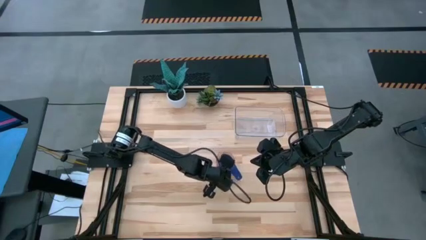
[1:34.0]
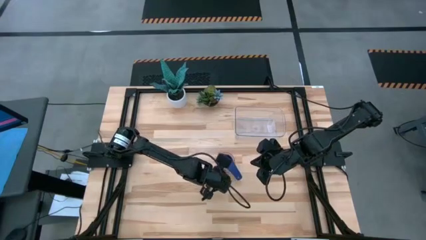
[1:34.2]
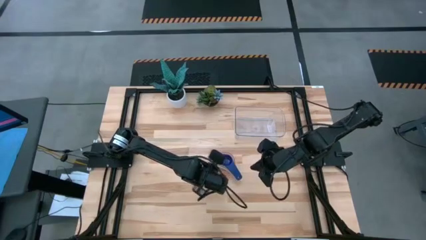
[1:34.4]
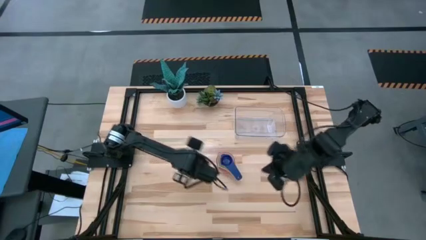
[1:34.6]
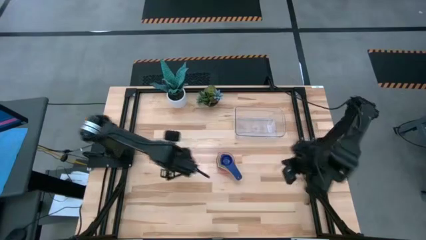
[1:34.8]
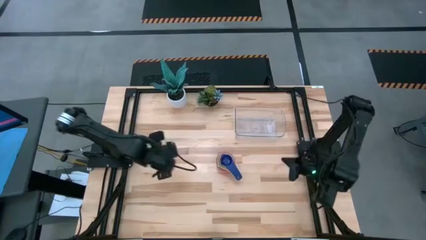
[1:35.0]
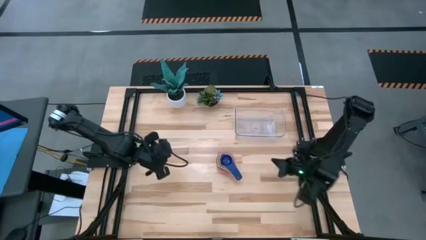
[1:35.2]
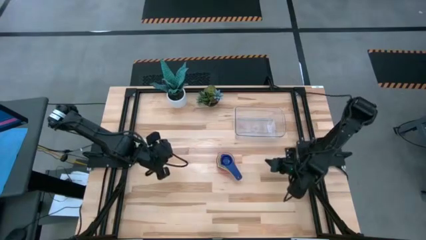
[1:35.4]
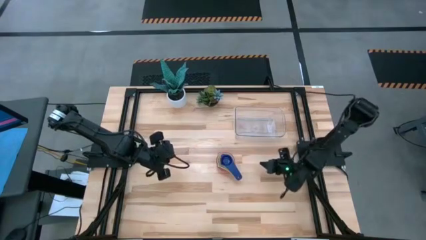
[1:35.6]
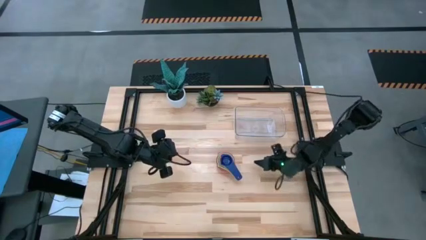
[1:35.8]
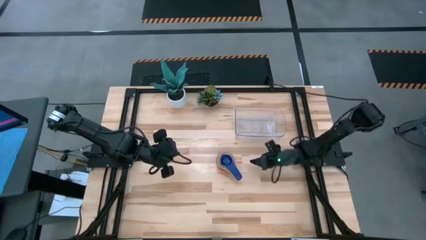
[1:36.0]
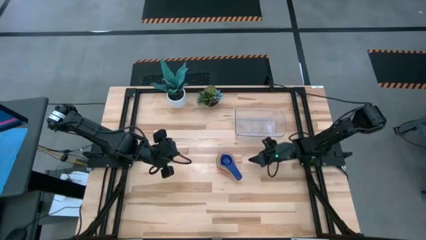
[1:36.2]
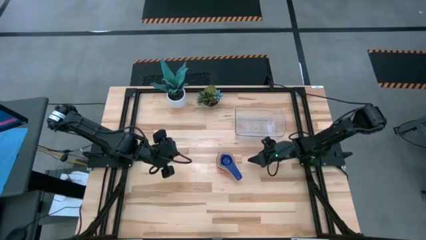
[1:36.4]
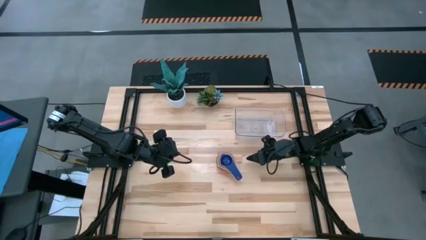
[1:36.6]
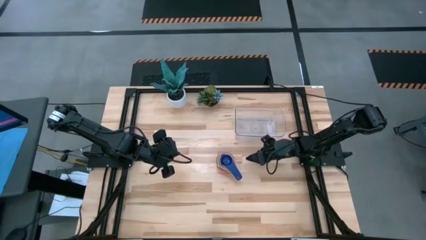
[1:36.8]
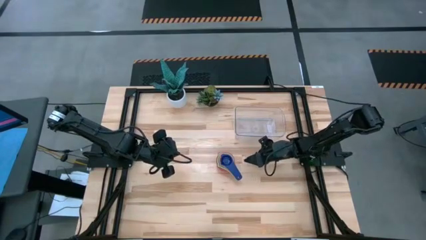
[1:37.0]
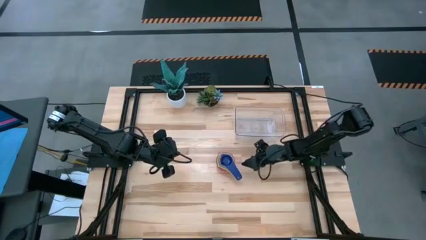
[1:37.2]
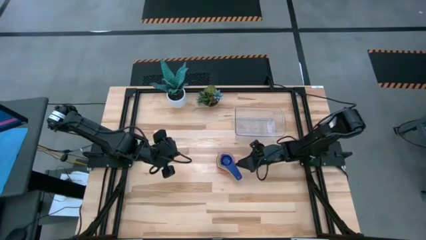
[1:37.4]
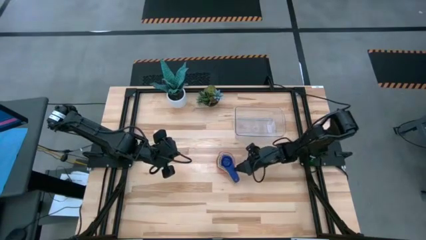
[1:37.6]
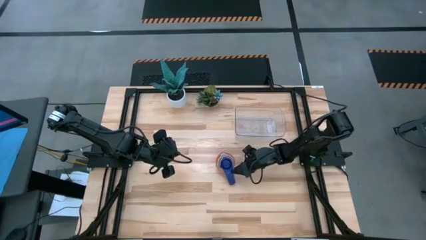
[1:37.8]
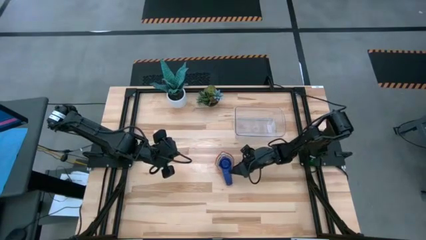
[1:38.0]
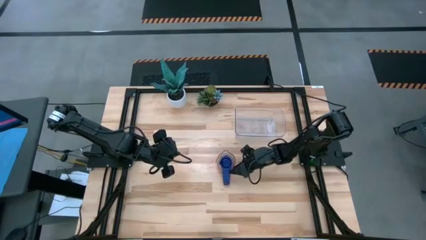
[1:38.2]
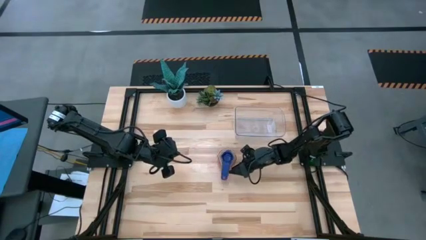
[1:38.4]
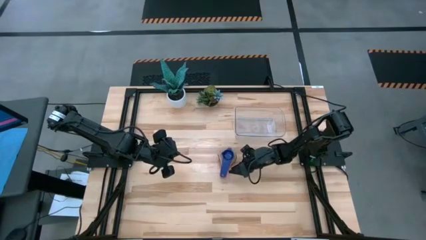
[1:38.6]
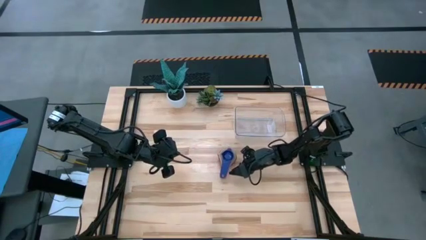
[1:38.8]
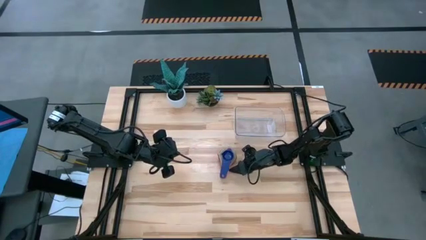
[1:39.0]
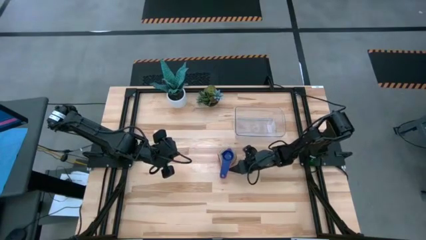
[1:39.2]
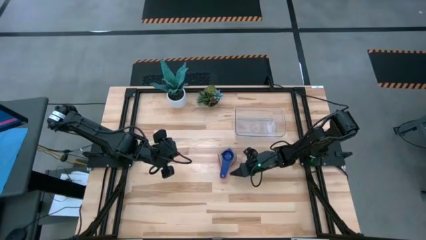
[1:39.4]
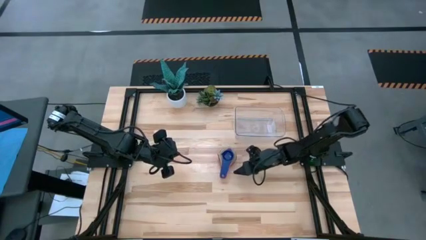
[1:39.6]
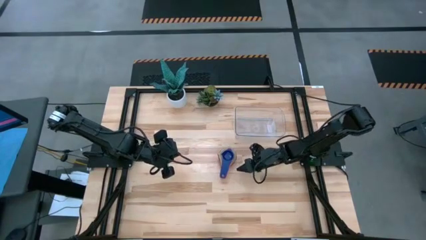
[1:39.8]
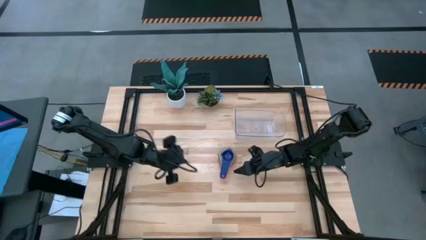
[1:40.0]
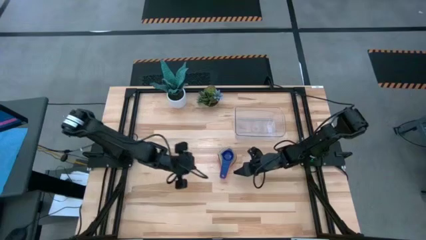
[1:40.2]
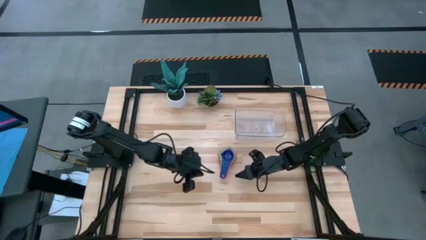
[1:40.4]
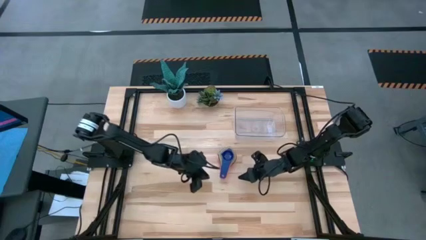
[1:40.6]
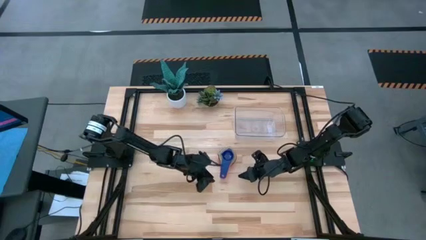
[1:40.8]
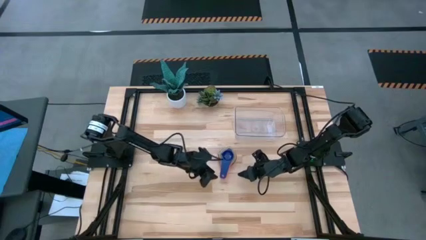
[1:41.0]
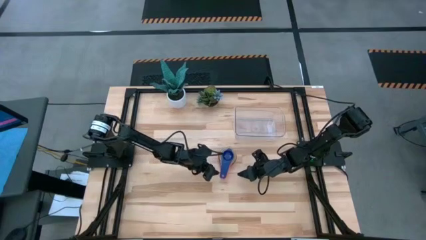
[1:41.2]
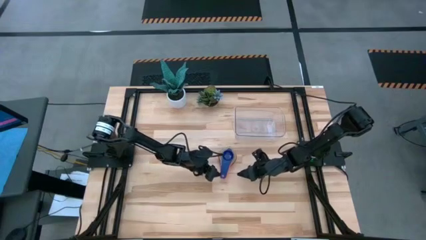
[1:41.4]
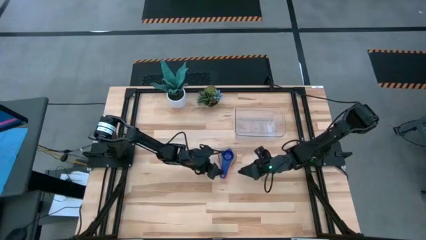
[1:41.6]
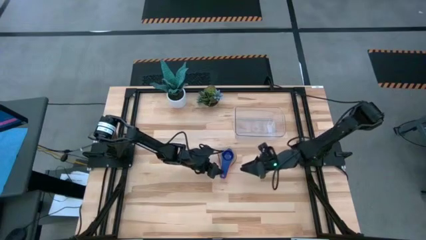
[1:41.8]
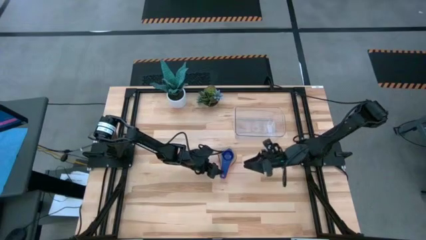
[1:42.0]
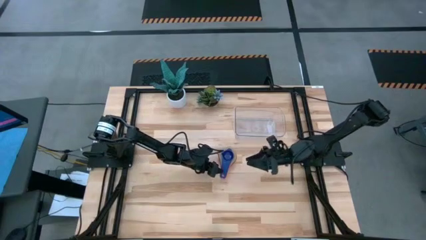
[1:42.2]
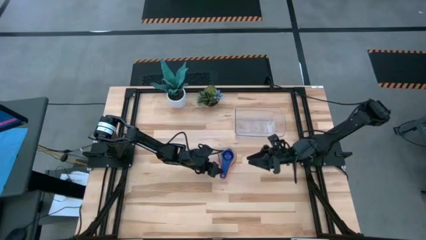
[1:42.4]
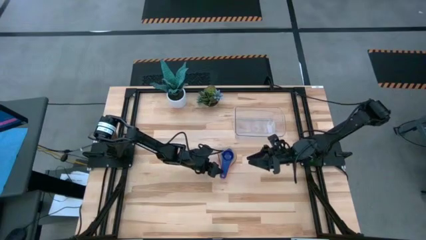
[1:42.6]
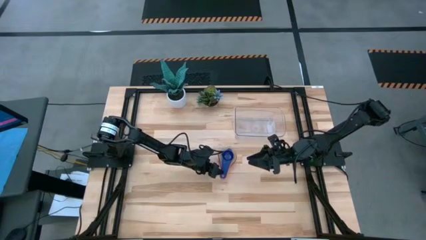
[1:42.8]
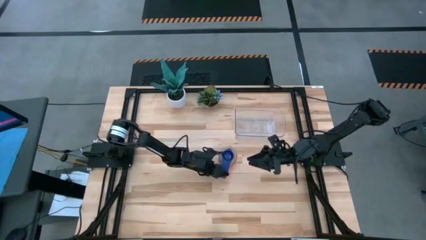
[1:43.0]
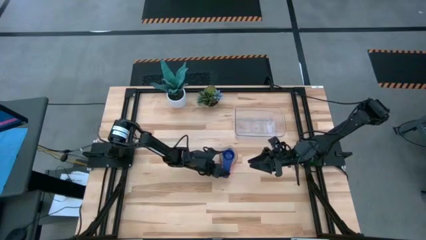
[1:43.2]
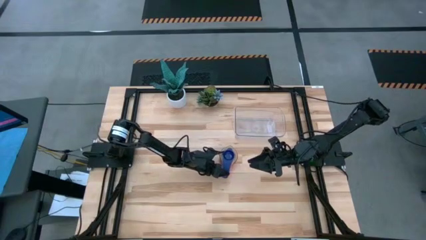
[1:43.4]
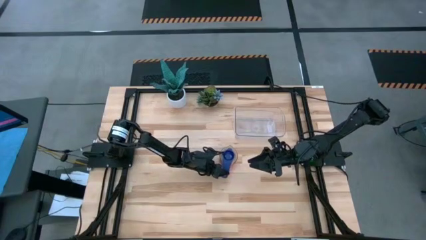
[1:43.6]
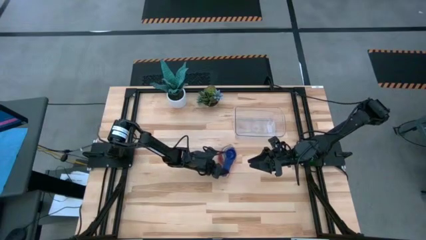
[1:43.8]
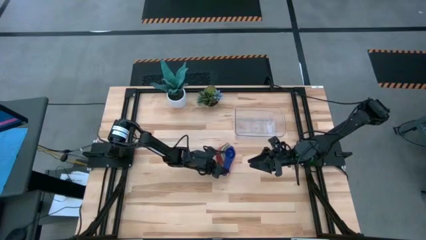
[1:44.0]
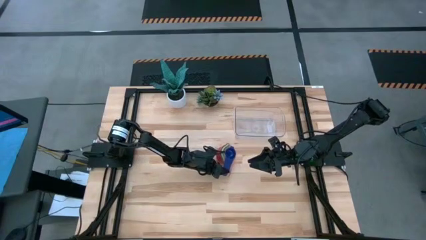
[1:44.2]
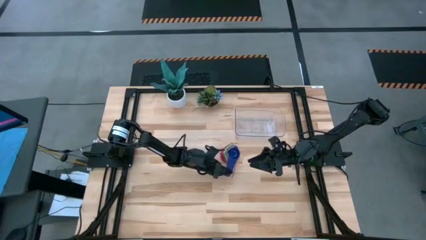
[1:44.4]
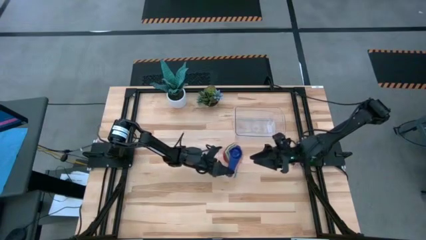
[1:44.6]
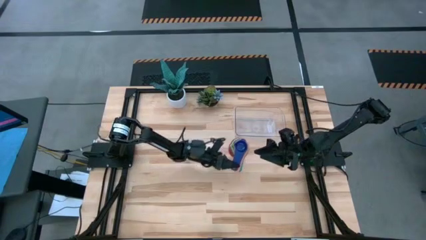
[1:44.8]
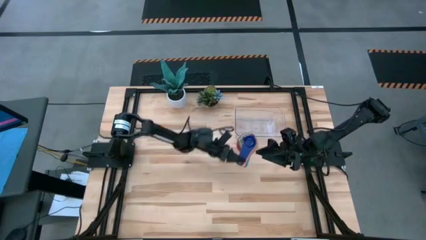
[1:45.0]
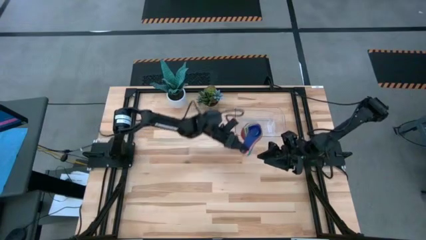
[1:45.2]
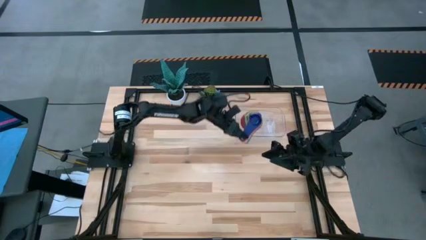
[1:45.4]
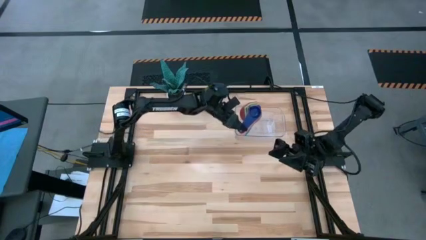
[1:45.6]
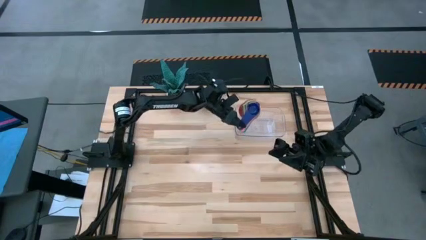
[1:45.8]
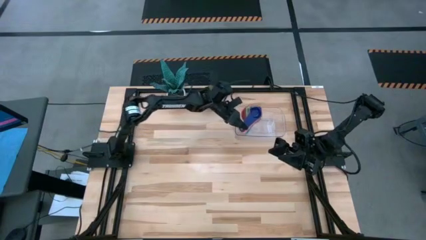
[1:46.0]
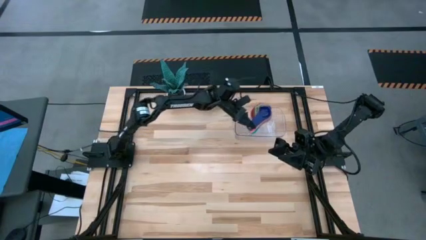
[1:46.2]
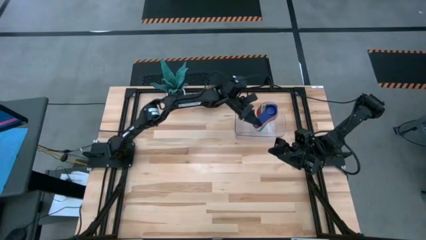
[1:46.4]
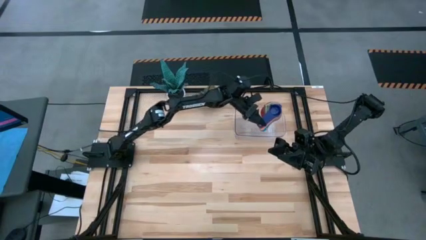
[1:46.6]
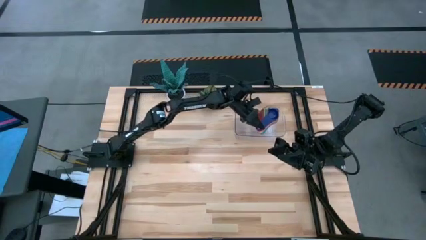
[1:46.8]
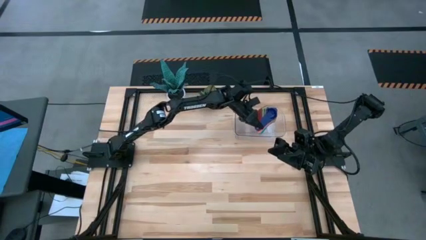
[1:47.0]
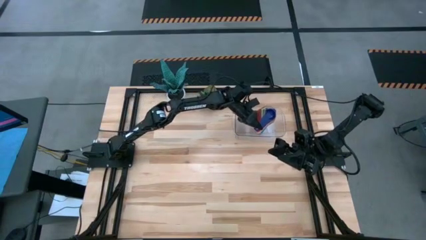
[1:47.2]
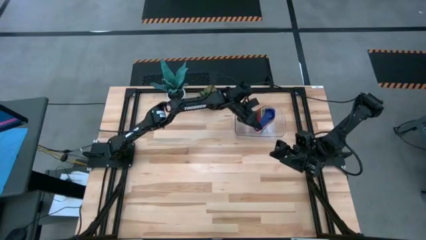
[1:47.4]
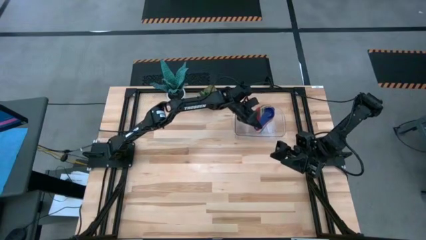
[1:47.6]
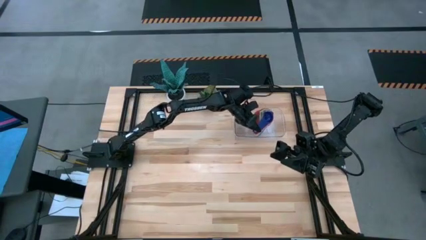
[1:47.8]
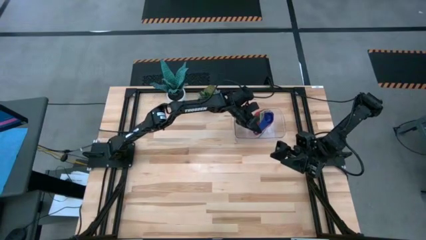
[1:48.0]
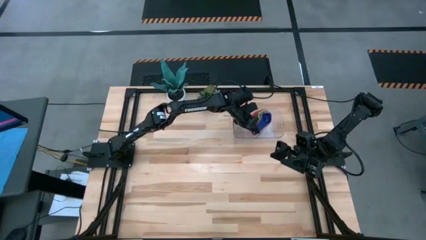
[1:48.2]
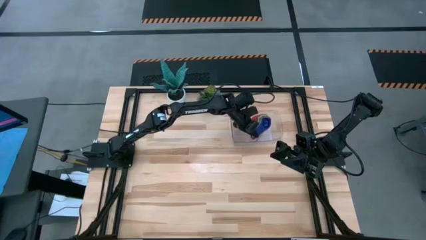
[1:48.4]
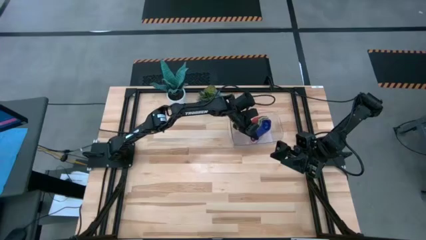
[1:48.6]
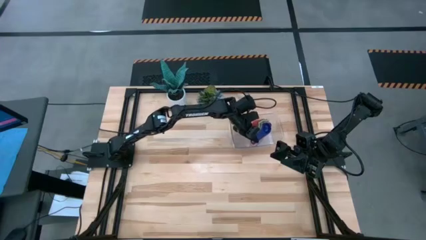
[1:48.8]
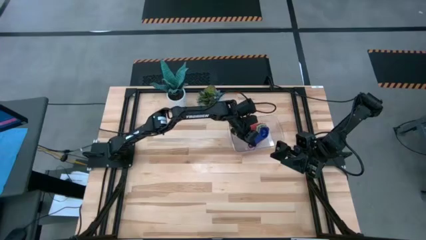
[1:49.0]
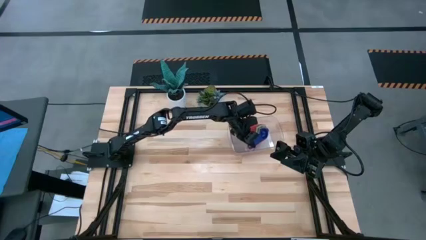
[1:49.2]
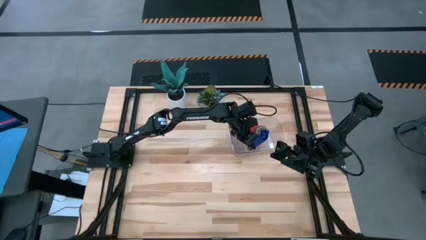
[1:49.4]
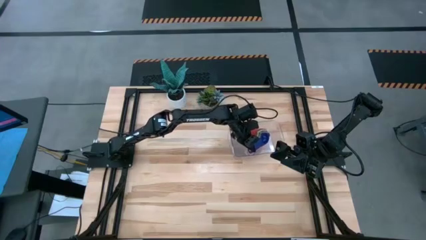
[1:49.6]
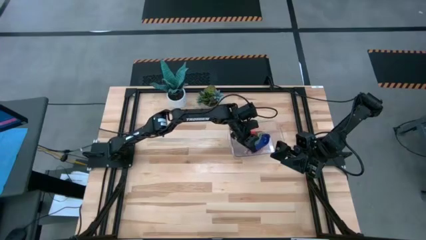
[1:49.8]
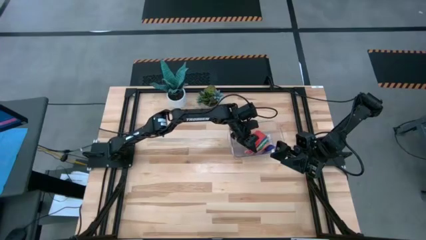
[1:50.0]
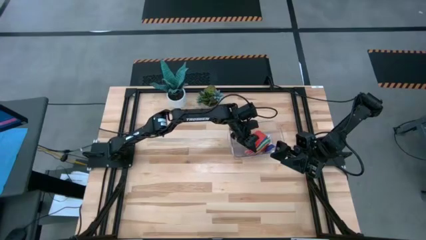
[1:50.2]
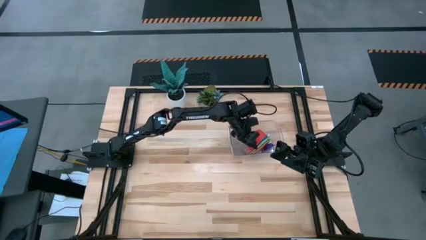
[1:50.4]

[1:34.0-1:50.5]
Task: Nest measuring cups in basket
Put the nested measuring cups into the transparent bin
